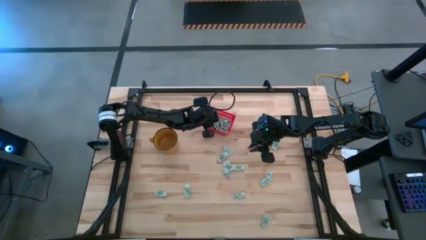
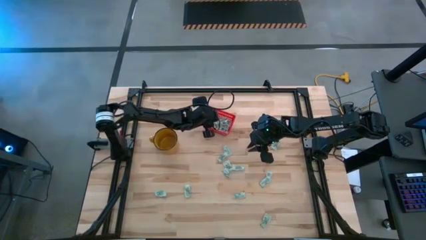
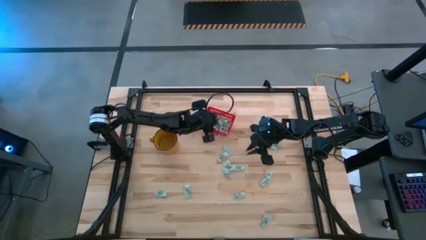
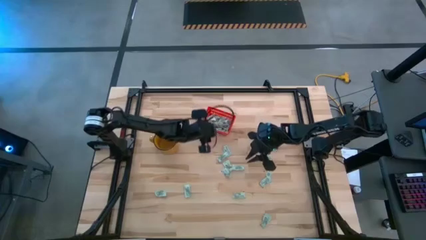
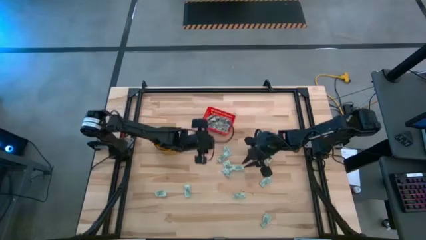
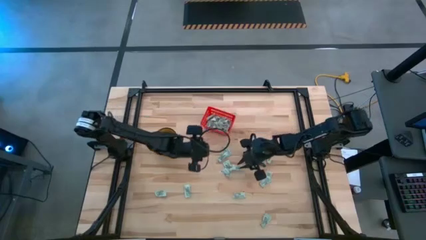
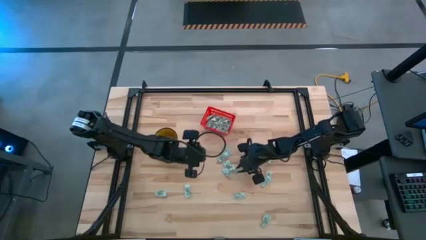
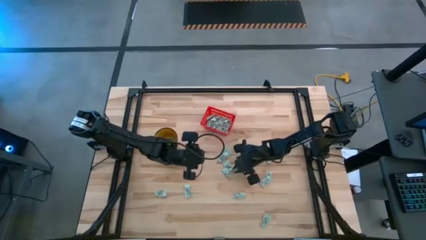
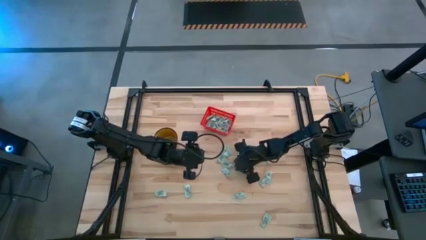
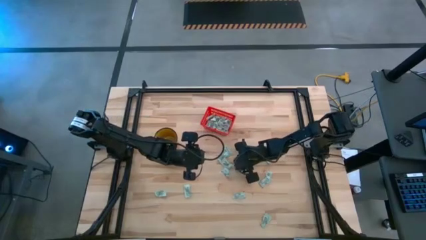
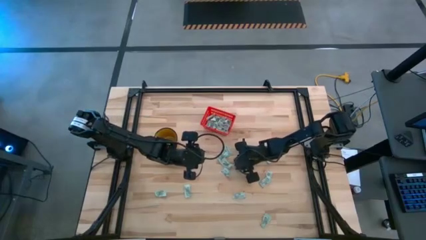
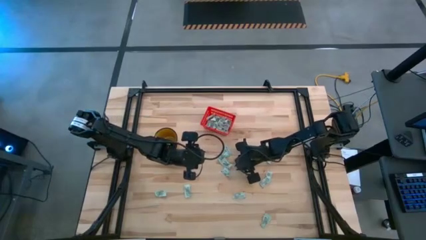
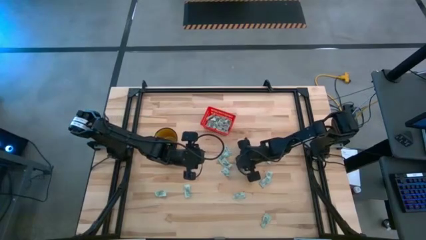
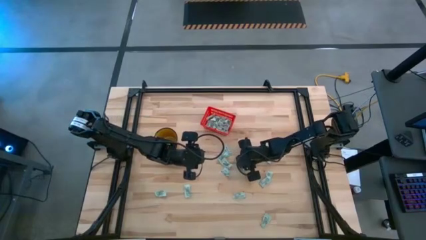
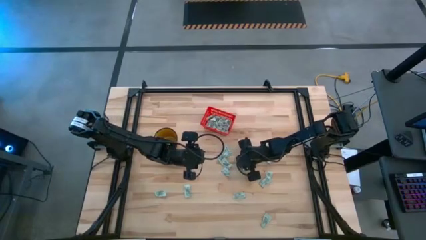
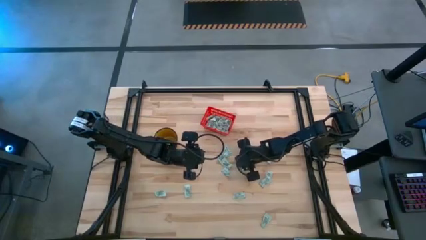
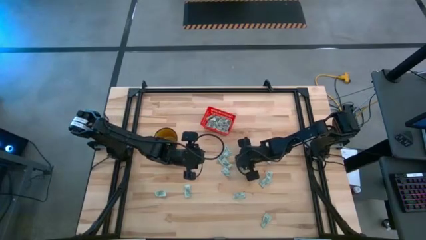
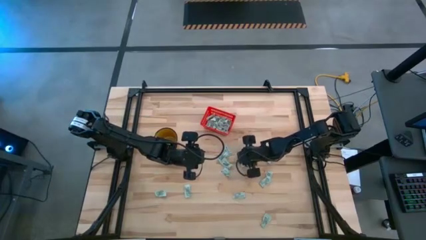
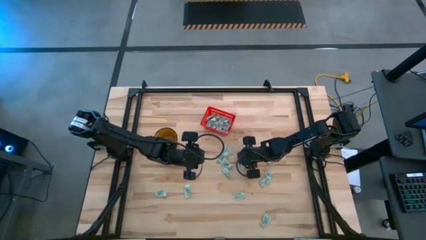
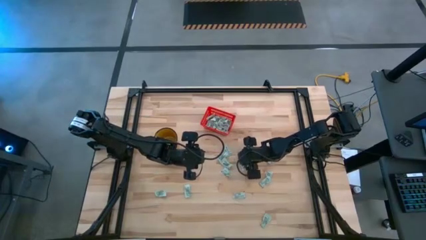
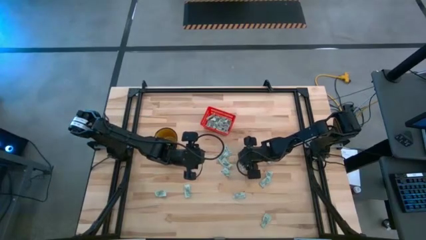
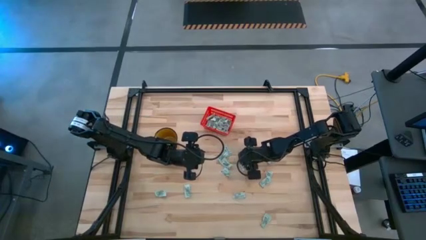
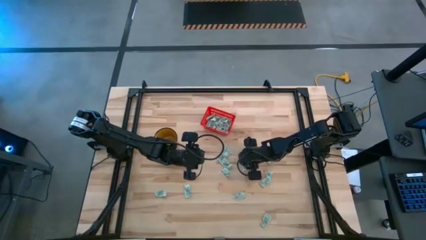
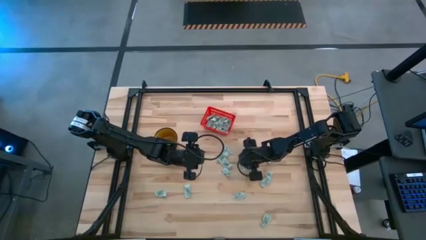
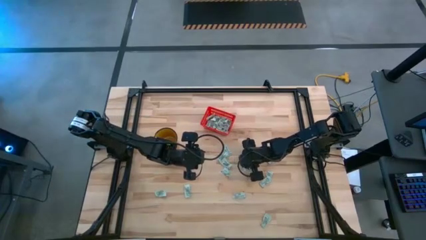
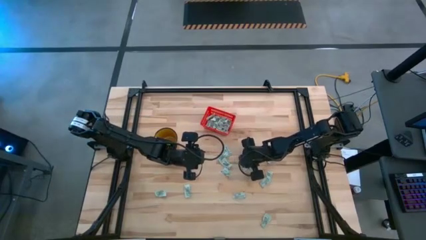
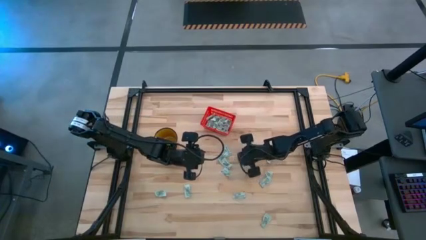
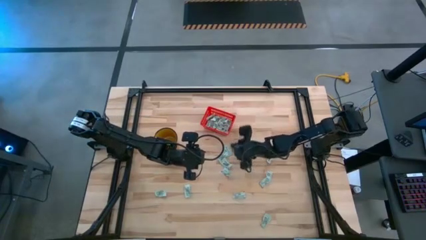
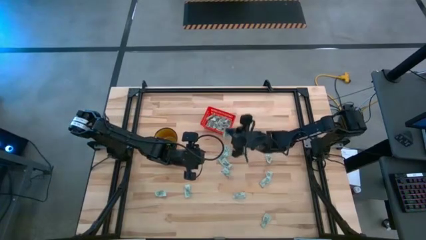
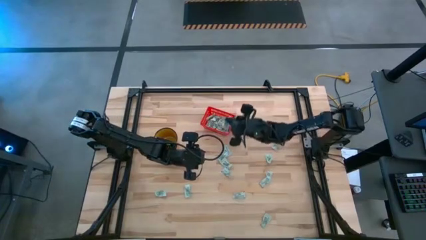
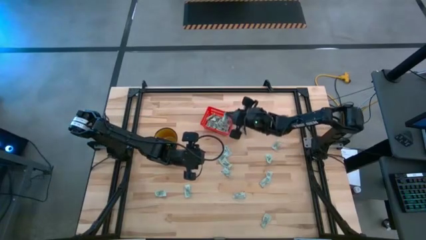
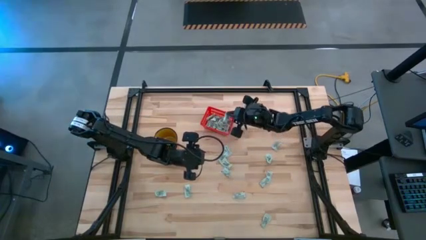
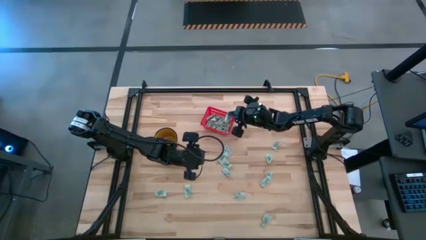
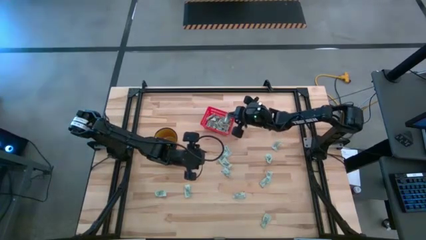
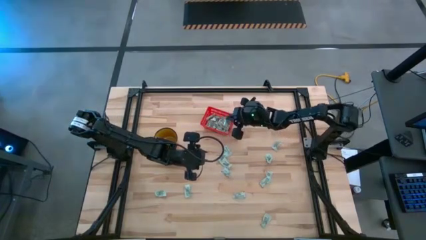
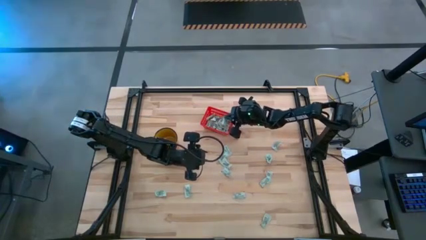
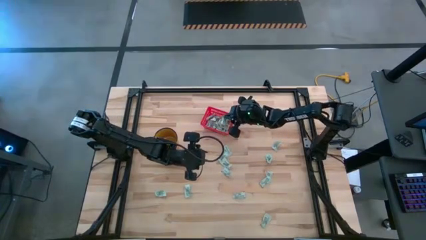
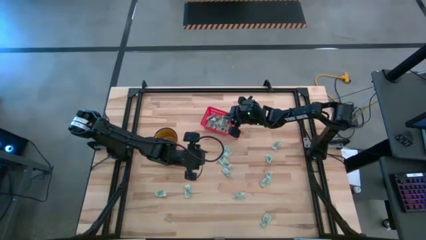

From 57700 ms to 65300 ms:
Task: Pick and place Stevia / Truvia into bins
Put the stevia packet into the red basket

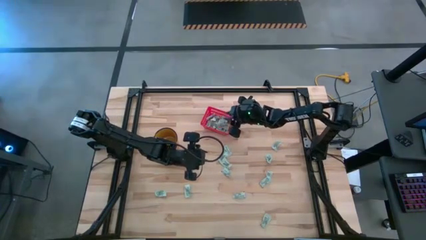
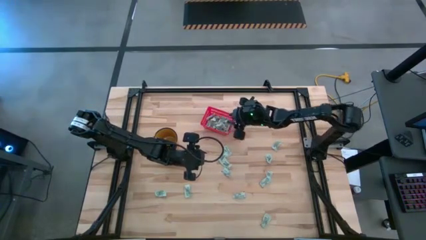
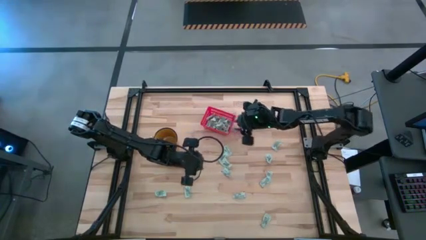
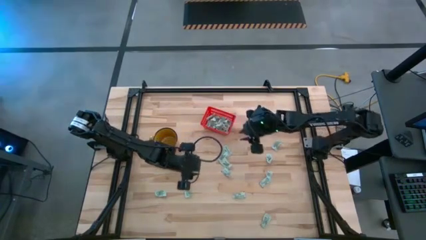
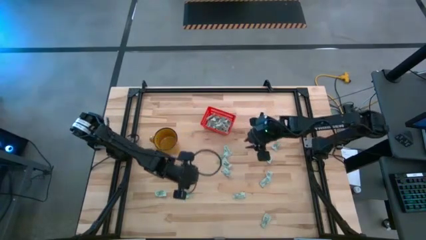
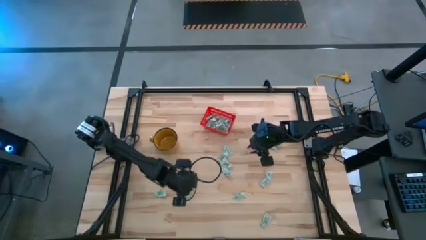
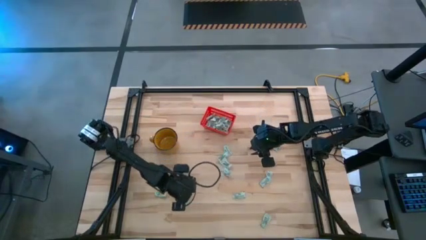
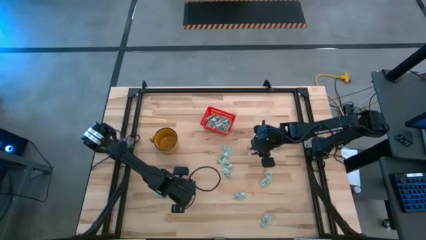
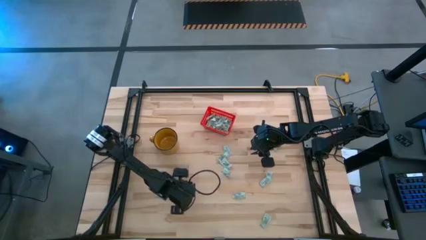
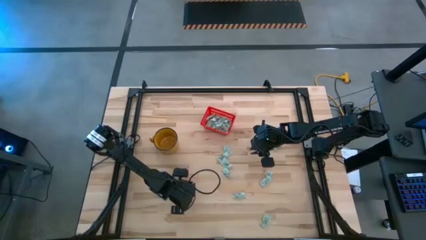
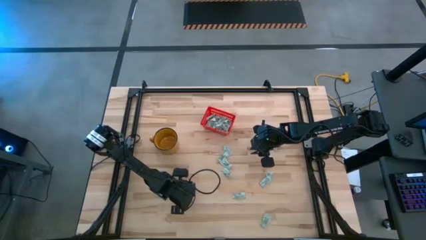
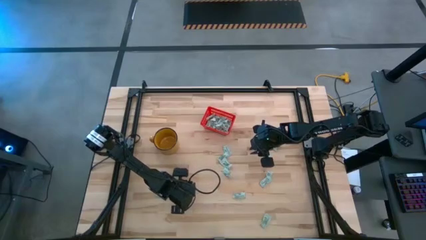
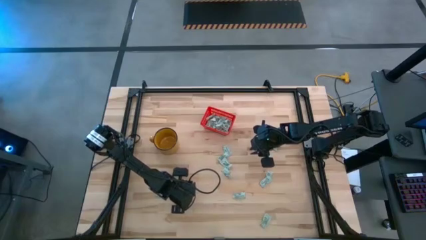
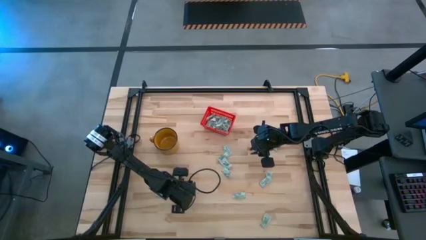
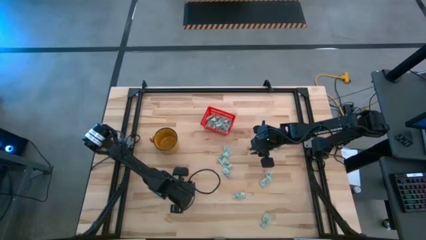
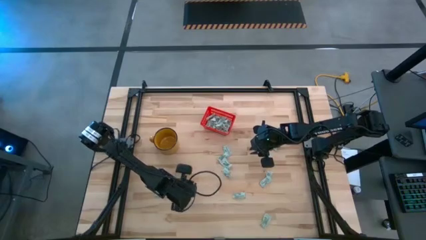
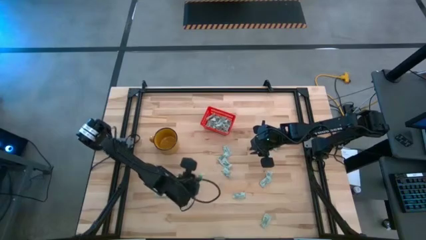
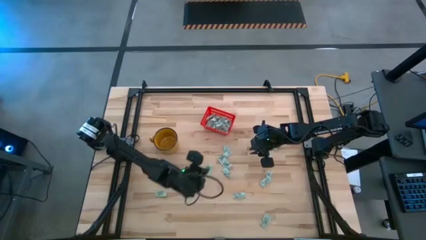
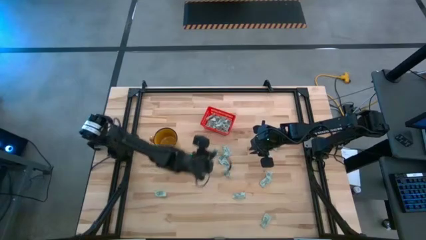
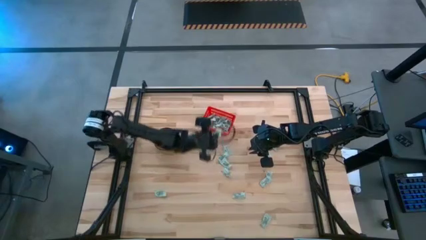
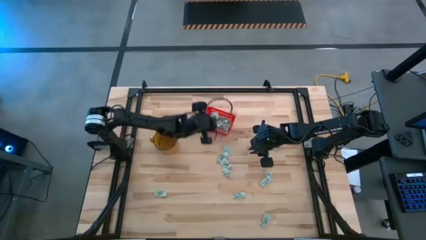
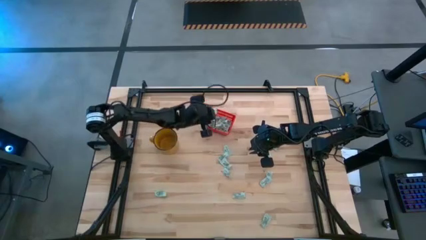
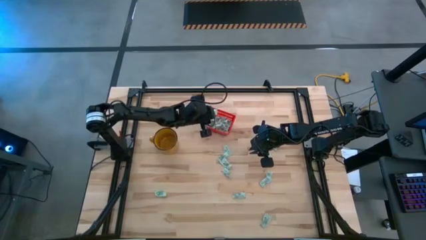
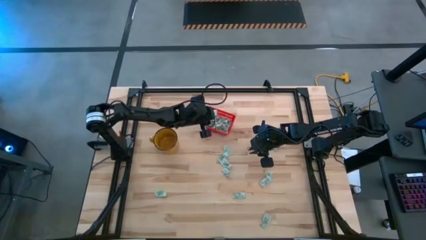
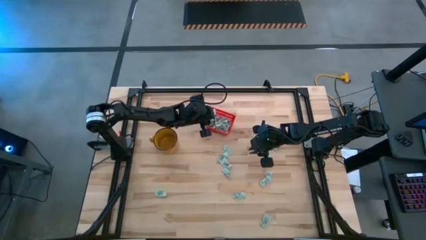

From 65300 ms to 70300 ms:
Put the stevia packet into the red basket

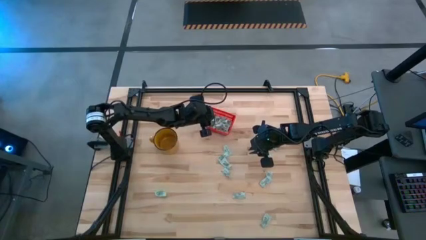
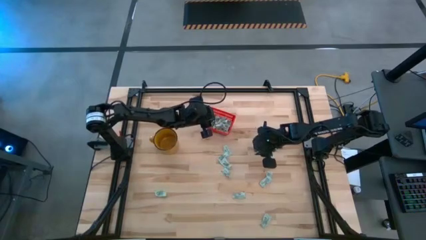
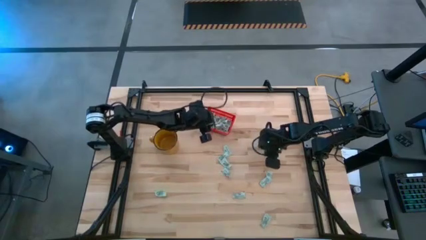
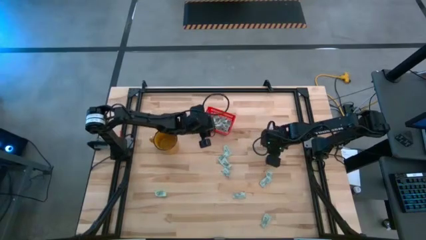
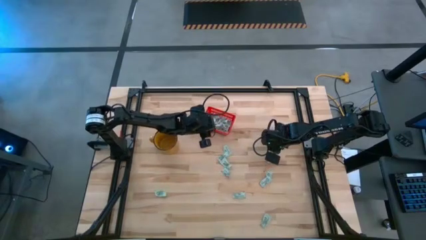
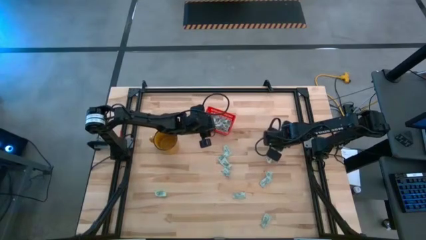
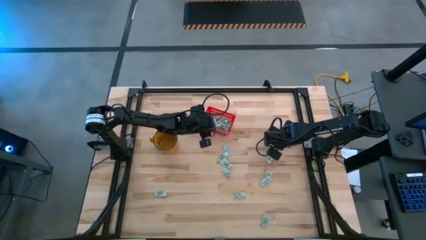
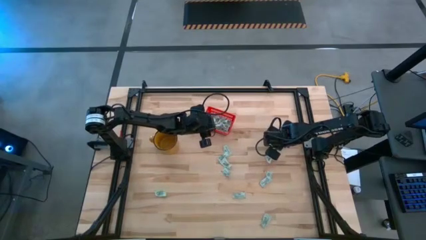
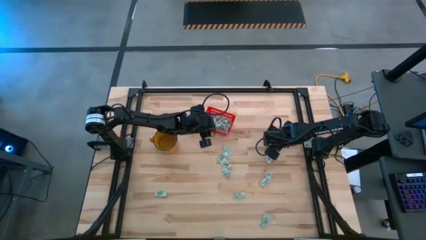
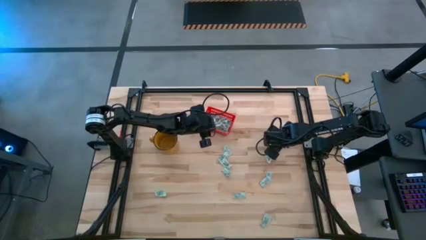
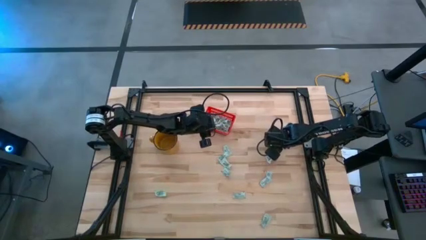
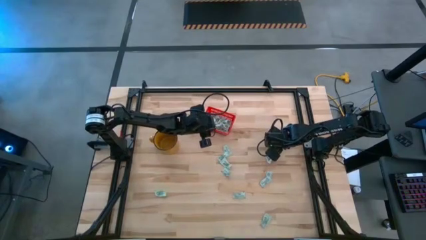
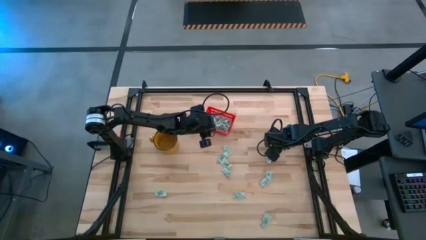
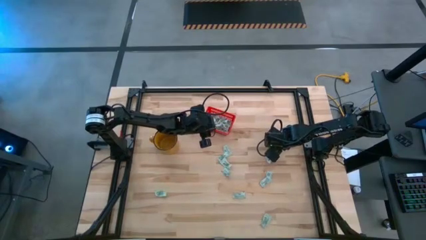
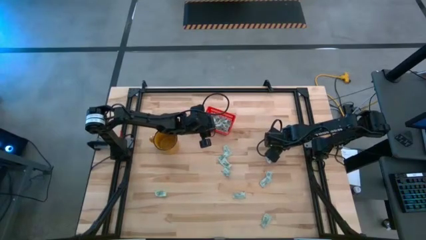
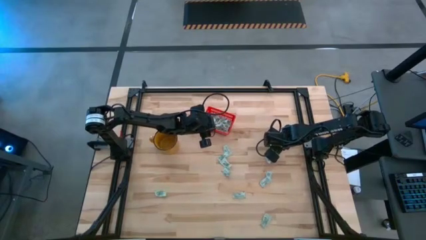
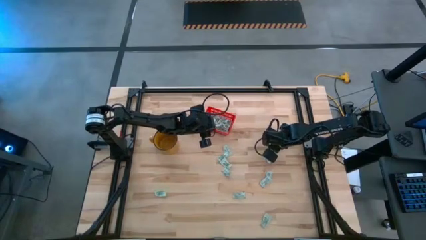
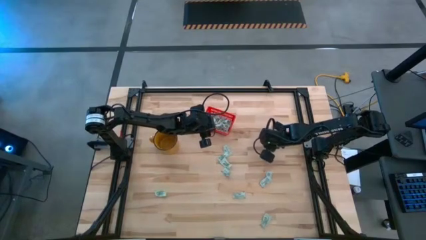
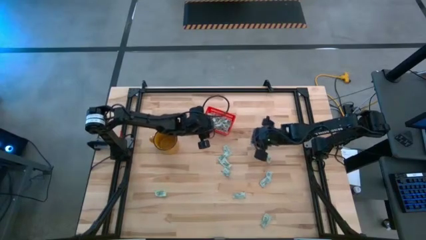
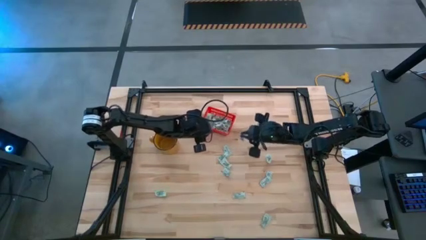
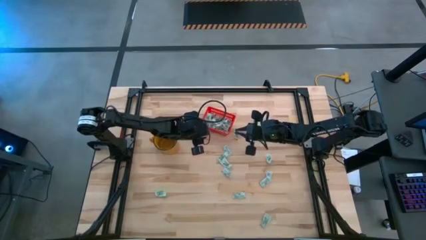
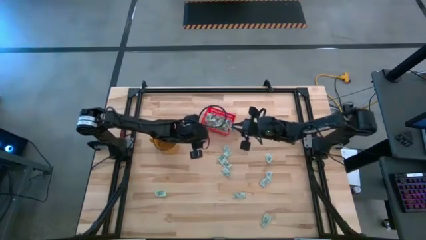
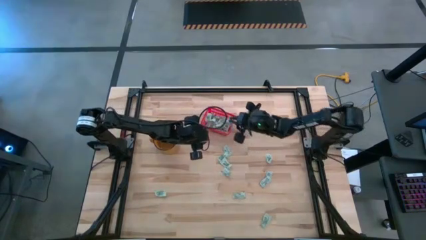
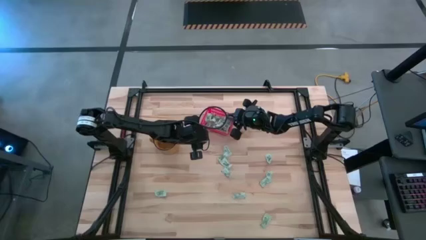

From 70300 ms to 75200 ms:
Put the stevia packet into the red basket
